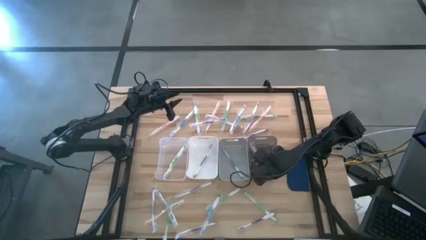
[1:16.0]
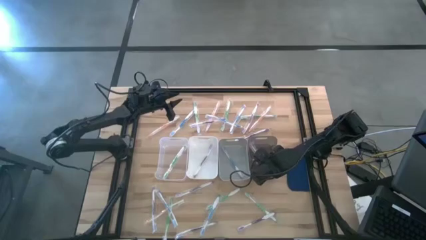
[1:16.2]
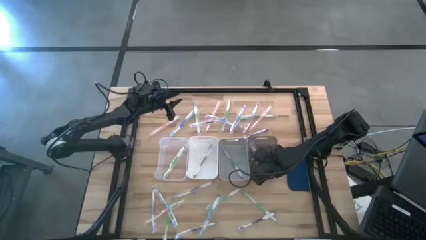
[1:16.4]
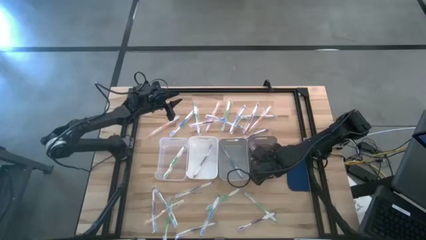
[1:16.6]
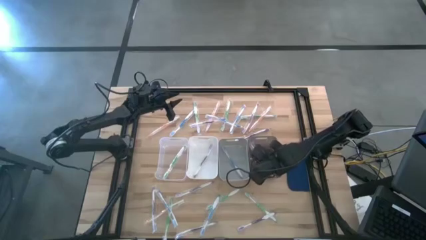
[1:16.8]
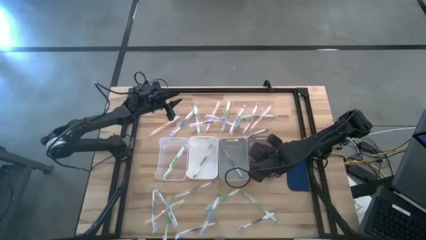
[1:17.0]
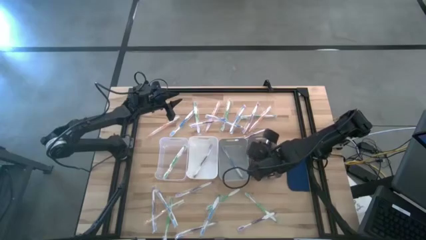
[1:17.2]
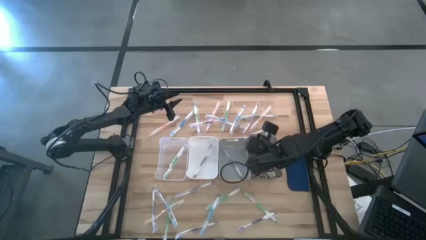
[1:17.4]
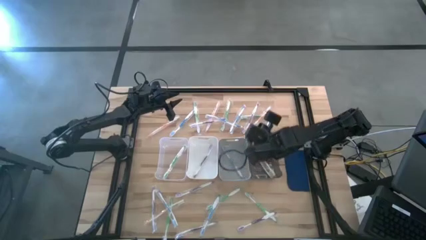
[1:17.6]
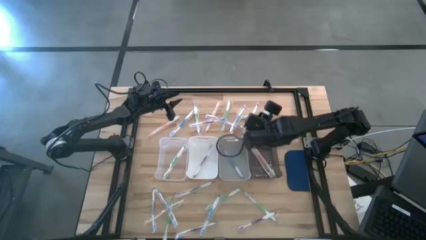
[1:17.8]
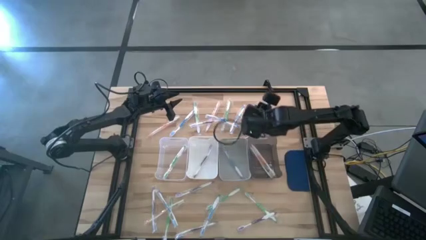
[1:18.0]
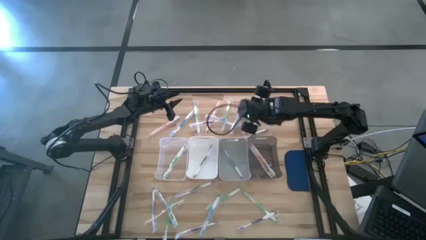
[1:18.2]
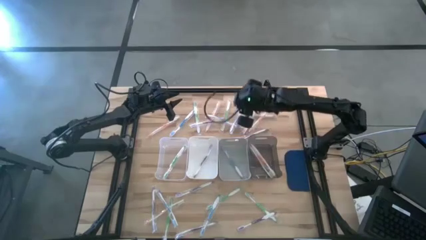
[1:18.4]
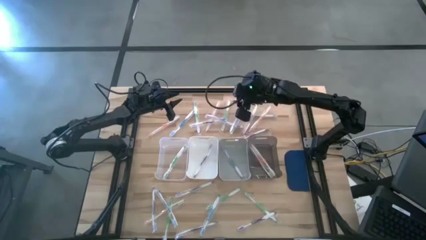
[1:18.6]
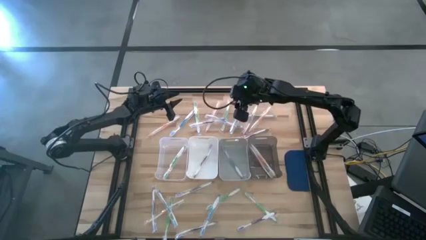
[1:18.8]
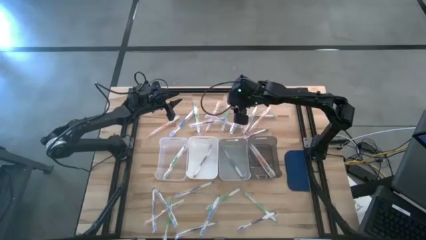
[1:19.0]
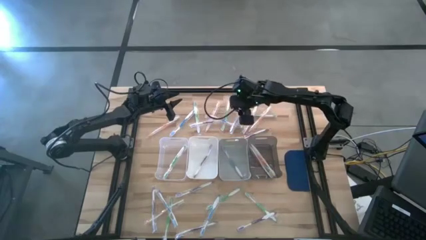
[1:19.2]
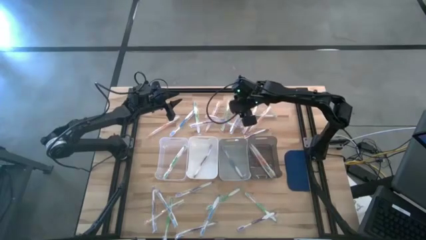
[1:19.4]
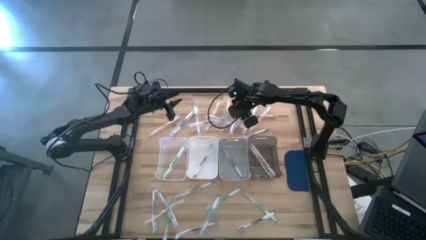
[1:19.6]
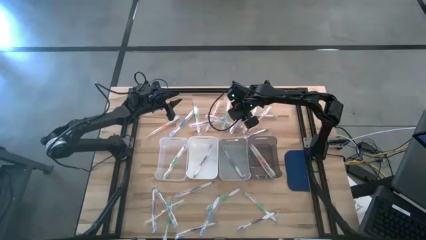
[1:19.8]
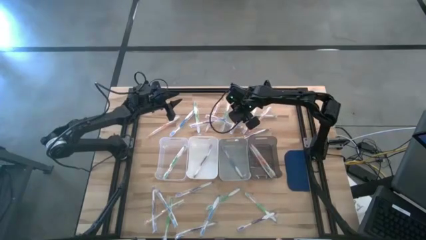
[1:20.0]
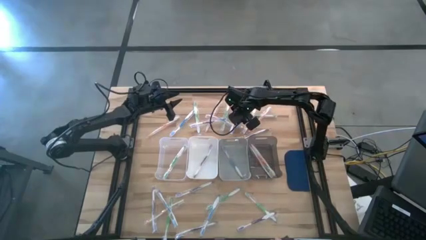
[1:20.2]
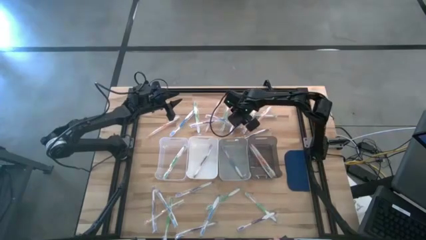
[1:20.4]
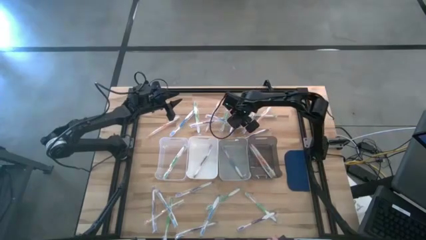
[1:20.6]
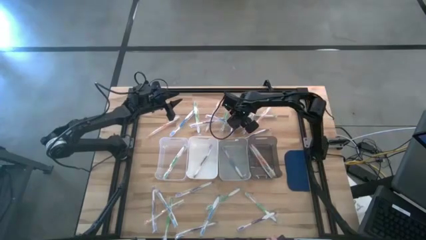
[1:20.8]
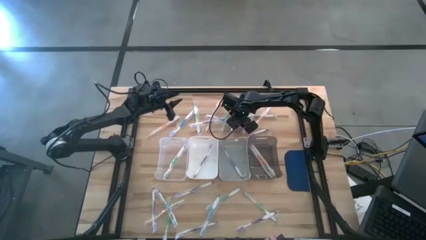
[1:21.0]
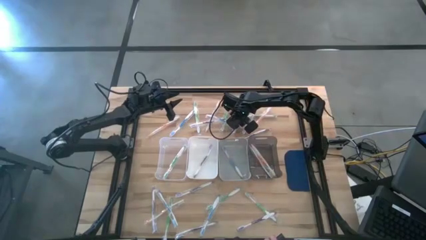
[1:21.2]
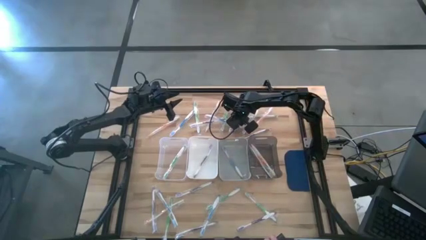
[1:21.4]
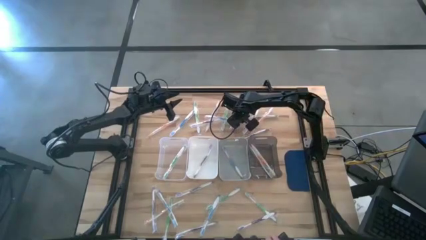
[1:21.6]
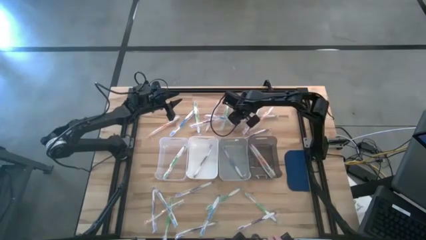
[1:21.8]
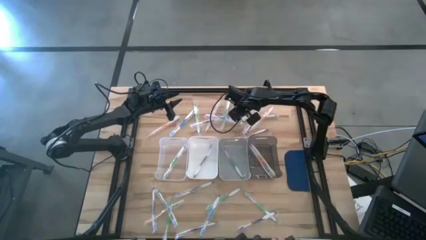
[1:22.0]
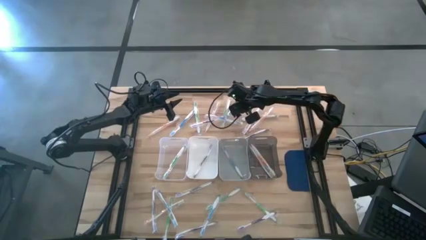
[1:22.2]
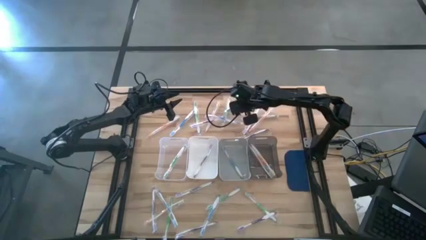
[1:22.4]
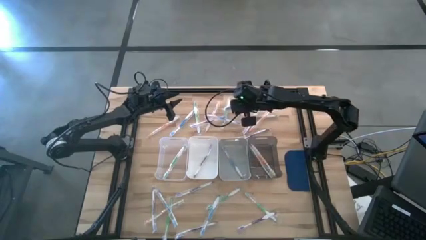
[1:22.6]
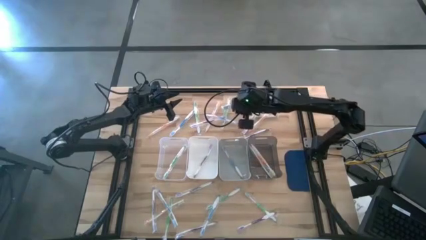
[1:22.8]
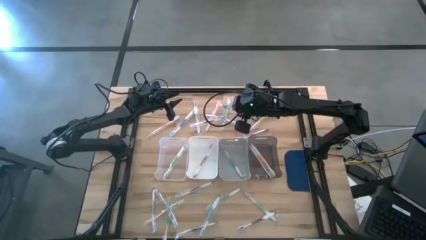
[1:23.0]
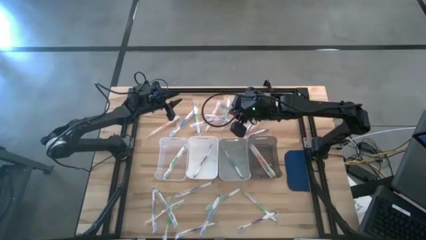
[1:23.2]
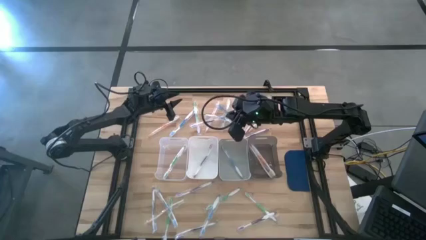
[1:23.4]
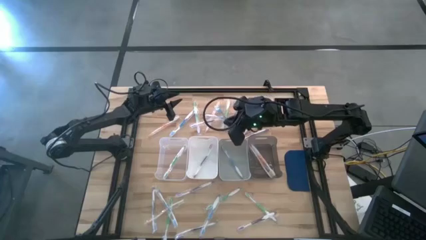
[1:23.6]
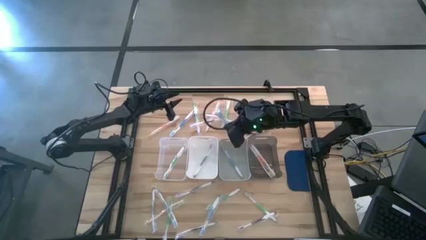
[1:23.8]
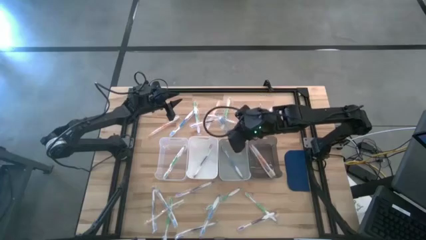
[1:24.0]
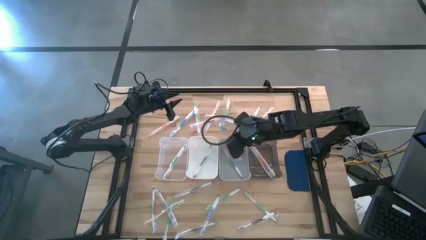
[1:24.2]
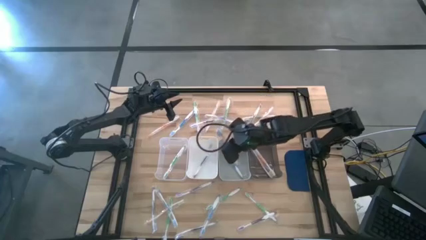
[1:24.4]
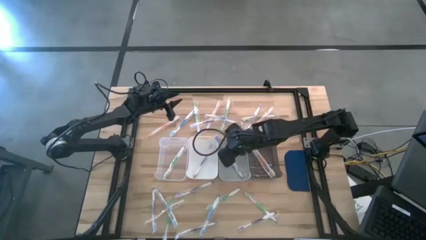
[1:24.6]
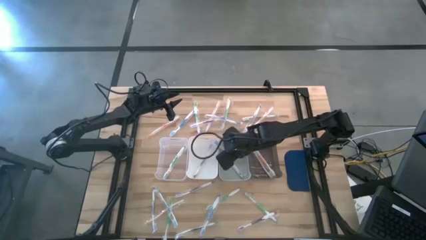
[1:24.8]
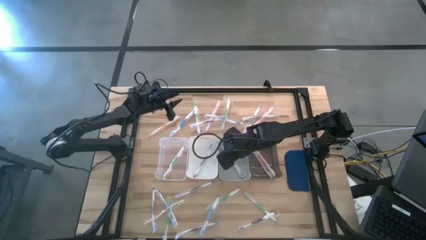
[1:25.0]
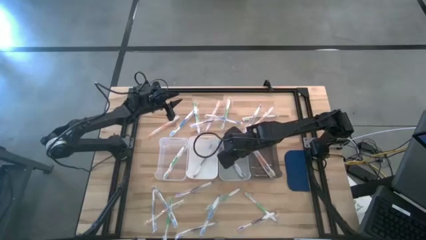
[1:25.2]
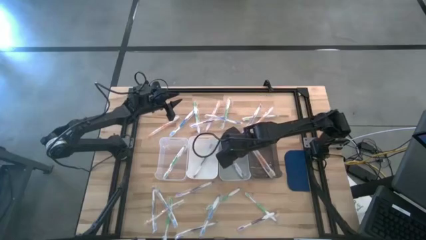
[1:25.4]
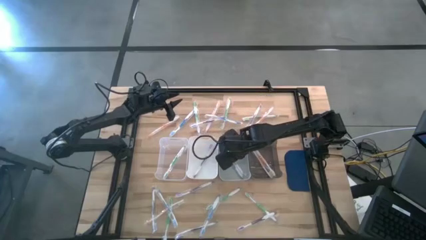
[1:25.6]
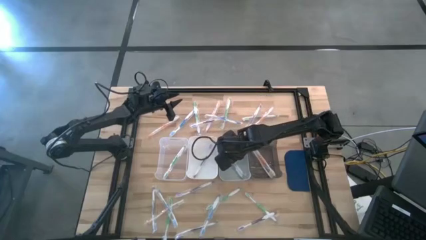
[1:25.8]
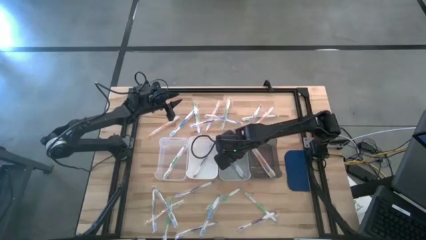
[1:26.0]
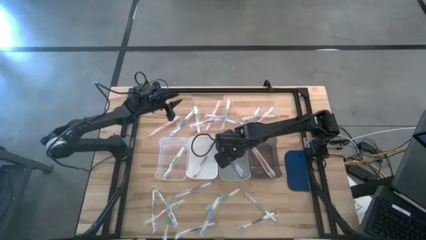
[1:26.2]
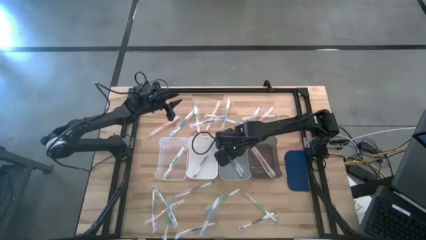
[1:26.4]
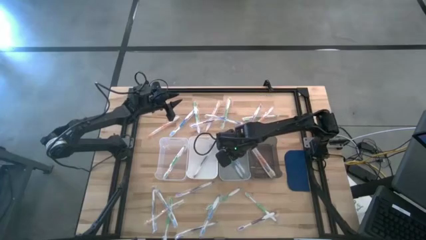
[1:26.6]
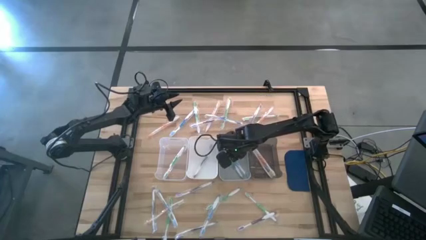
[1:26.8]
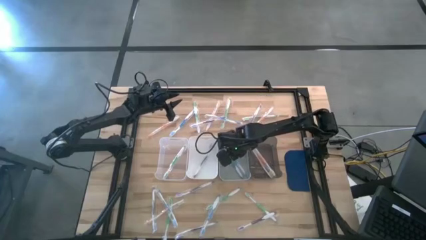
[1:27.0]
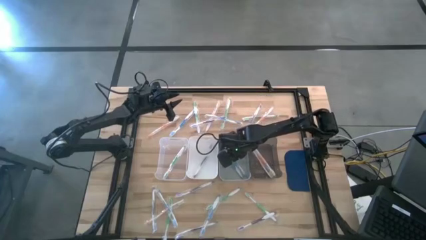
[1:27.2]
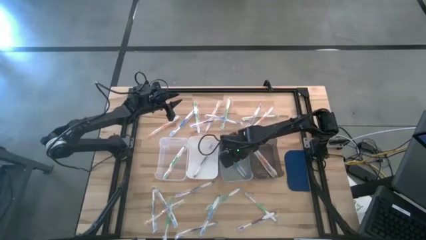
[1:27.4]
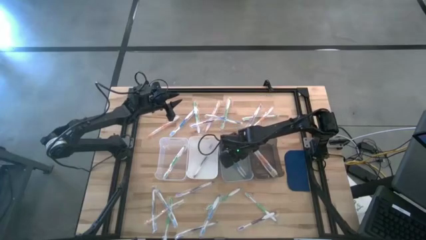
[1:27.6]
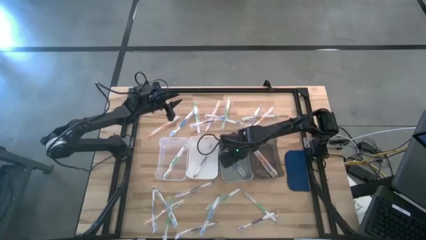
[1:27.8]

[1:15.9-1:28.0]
Task: Pick & Place Toothbrushes
Put the blue toothbrush into the gray bin

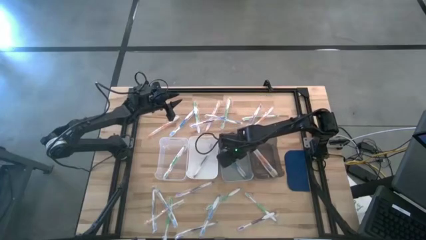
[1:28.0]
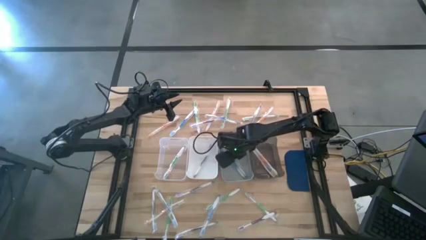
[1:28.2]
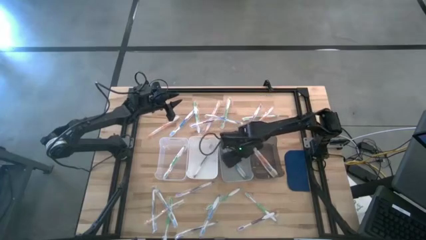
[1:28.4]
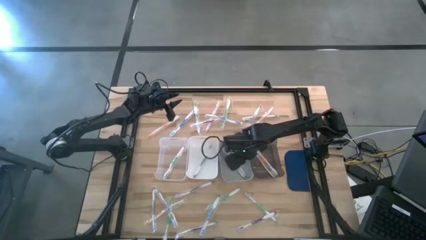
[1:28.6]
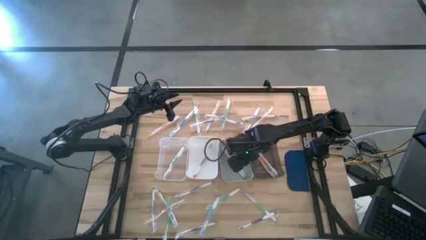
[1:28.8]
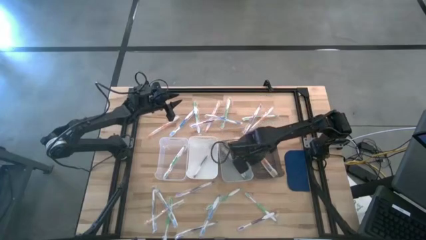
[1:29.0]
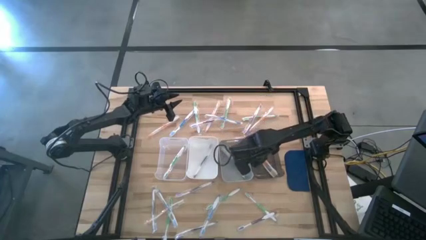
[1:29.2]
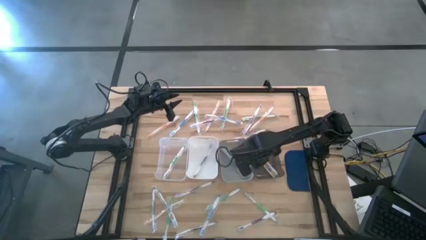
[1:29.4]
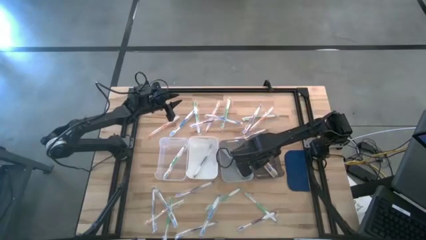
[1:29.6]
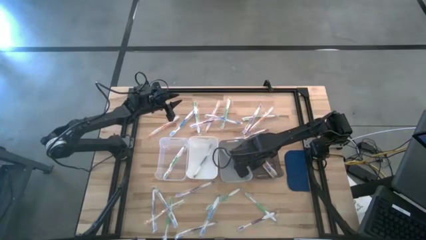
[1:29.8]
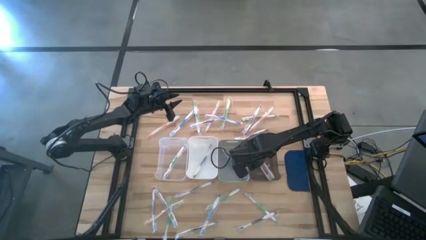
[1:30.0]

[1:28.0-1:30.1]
Adjust the black bin
